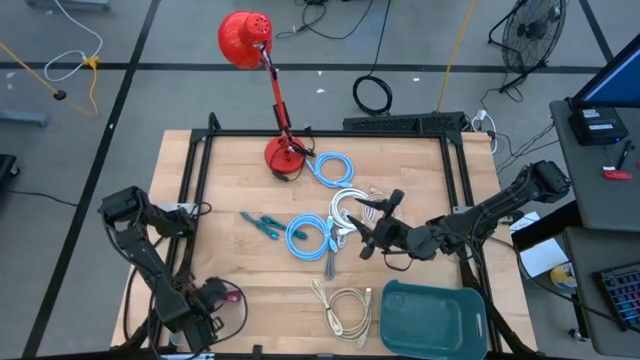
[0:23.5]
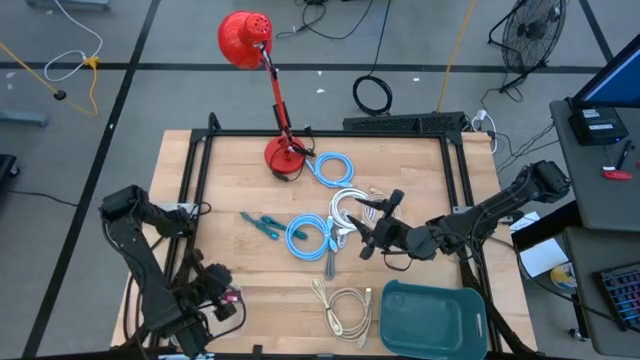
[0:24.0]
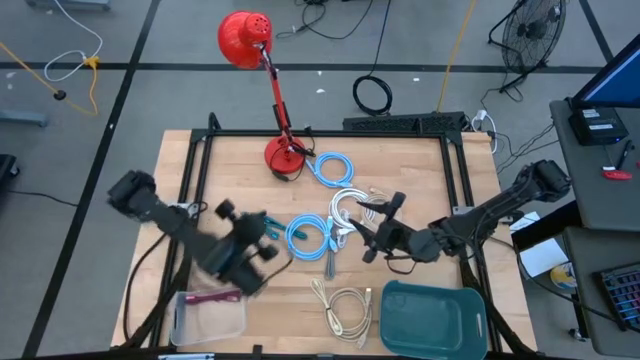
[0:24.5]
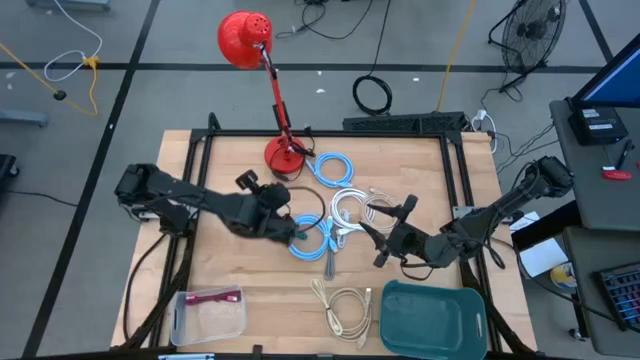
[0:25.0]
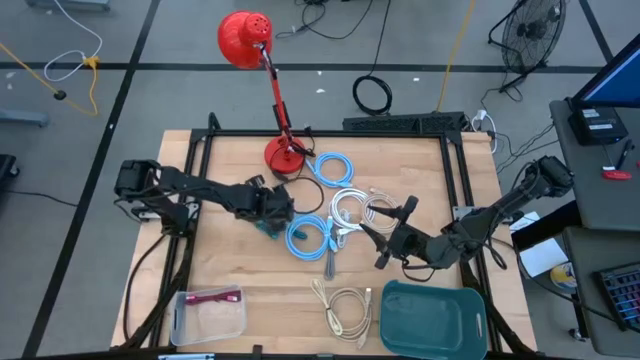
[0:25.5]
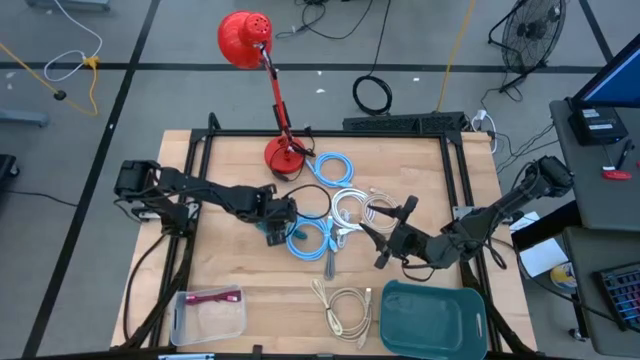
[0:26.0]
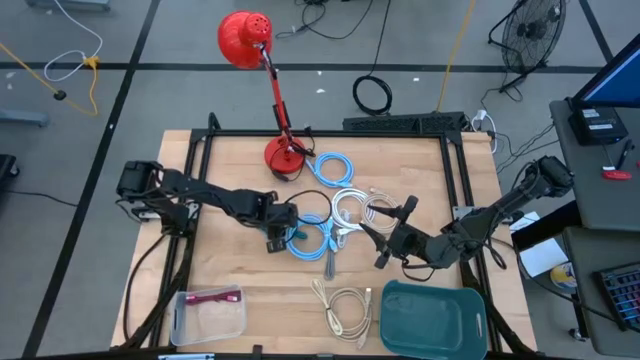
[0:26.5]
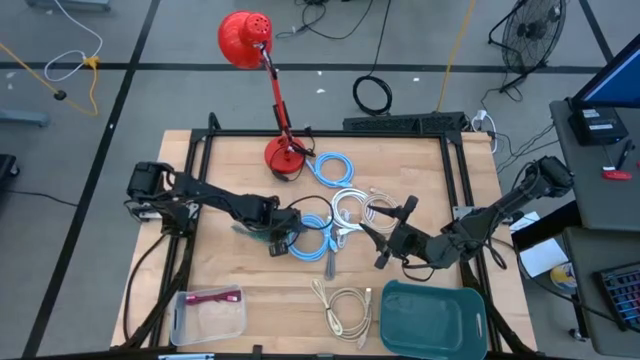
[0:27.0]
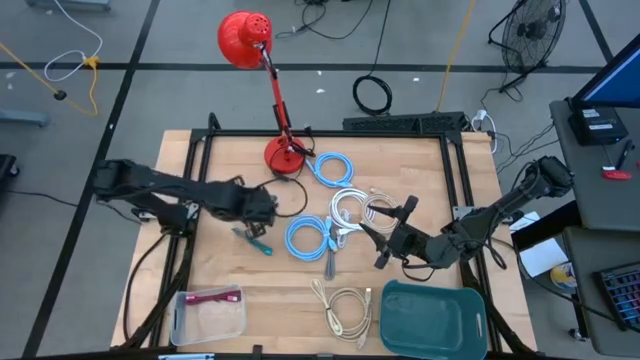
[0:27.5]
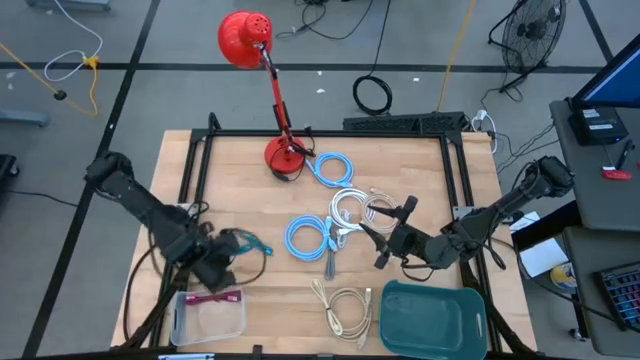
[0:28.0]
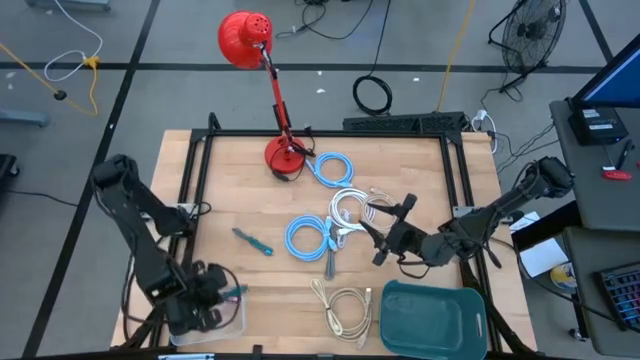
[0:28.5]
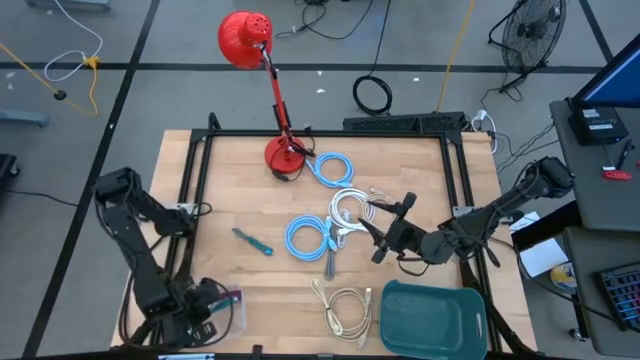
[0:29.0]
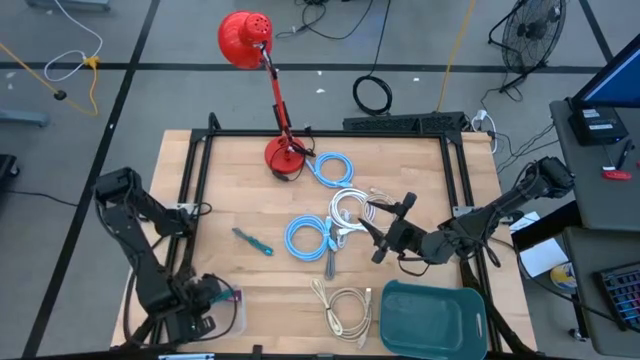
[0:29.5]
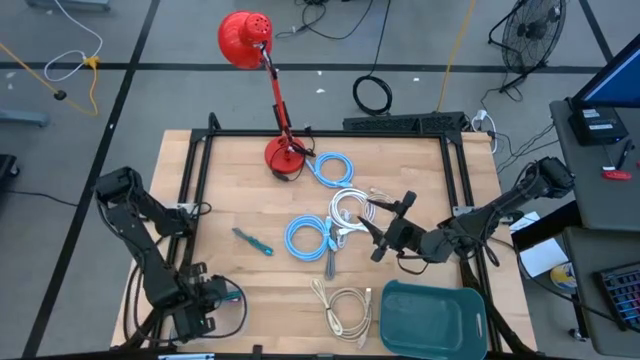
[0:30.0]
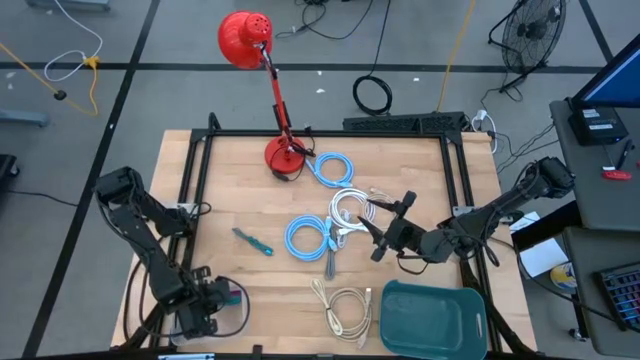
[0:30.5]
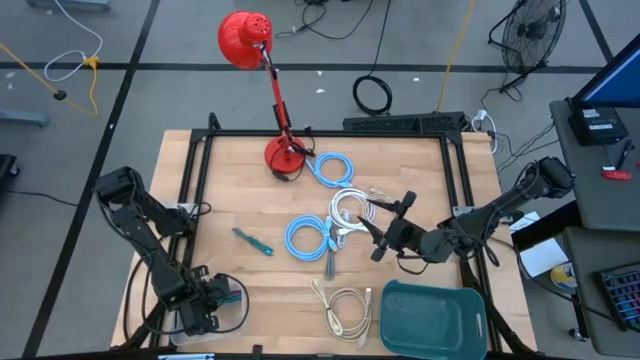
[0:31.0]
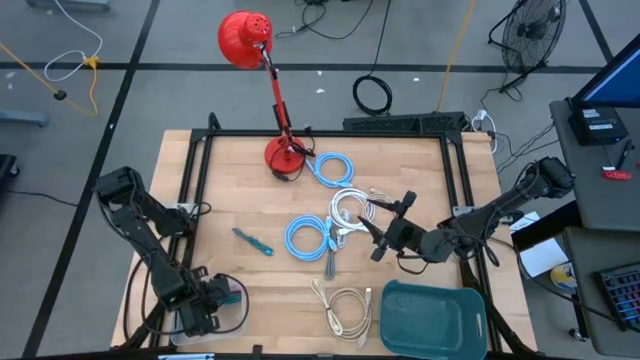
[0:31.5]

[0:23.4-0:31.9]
Task: Pick & Place USB Port
Put the right blue black charger cable into the transparent bin

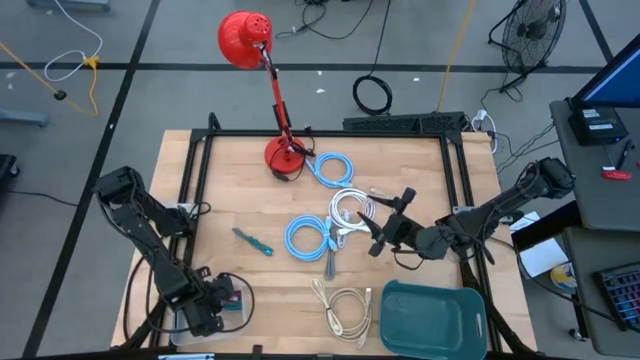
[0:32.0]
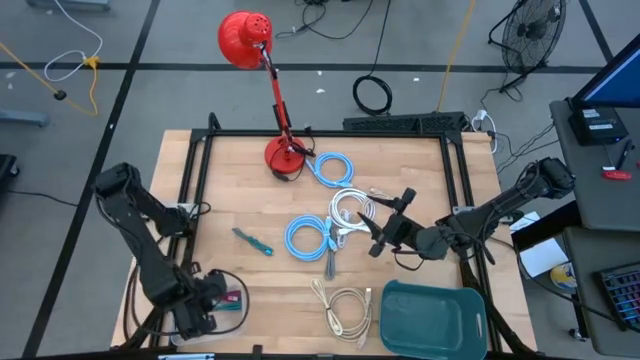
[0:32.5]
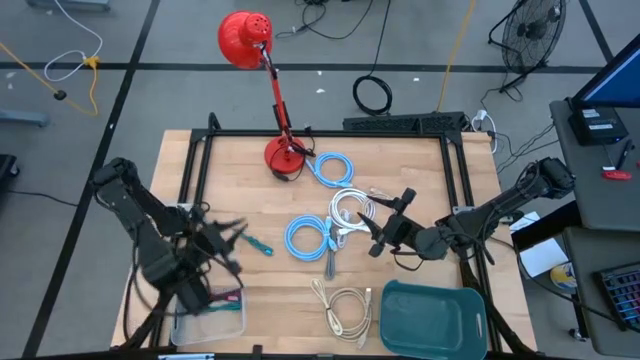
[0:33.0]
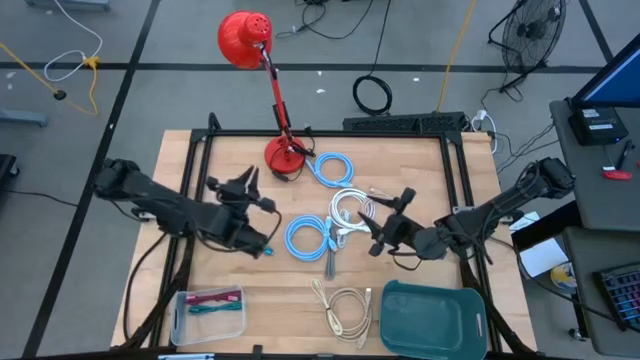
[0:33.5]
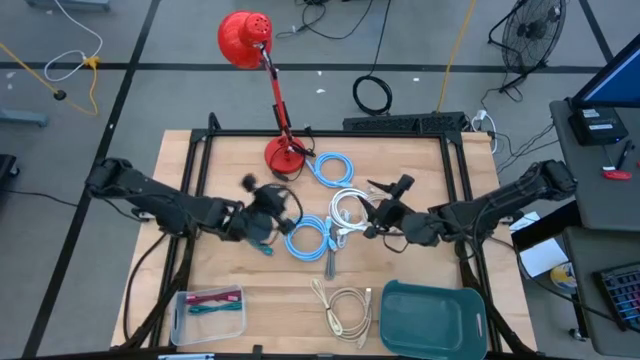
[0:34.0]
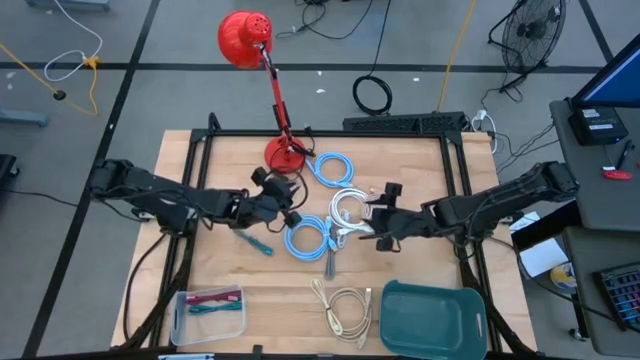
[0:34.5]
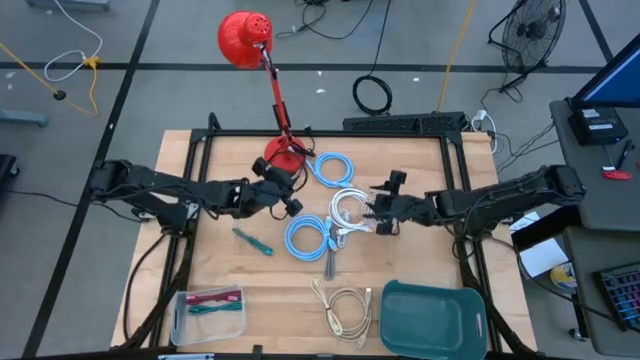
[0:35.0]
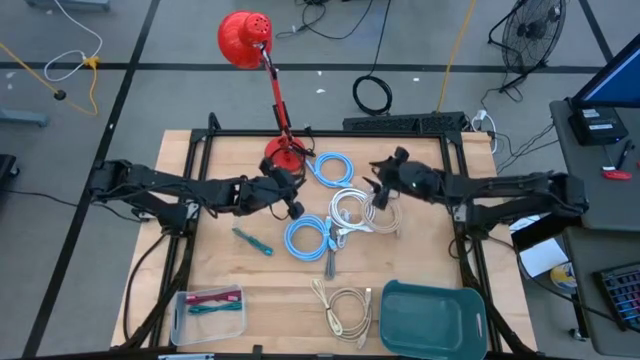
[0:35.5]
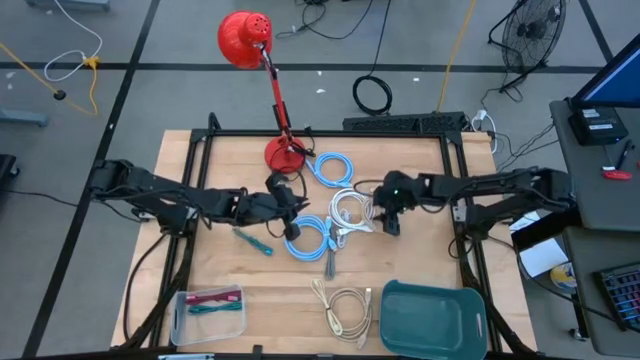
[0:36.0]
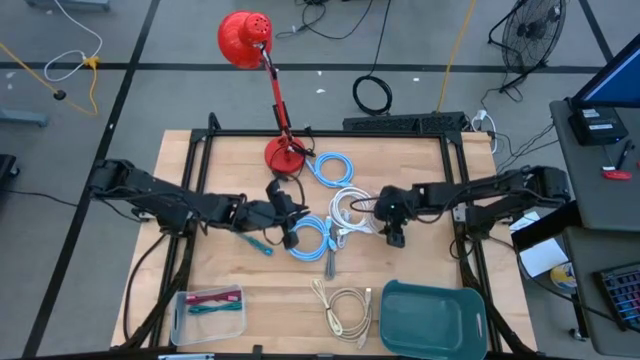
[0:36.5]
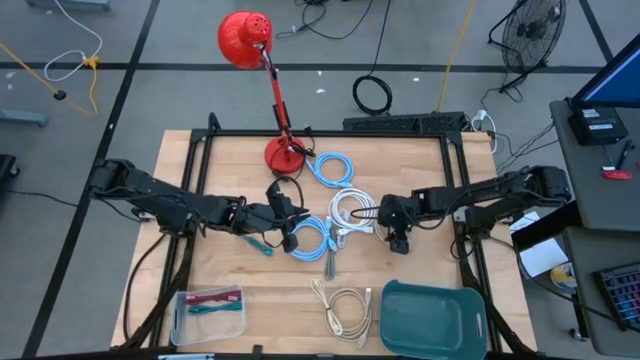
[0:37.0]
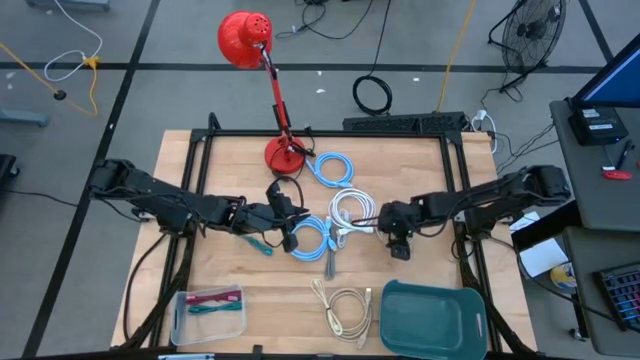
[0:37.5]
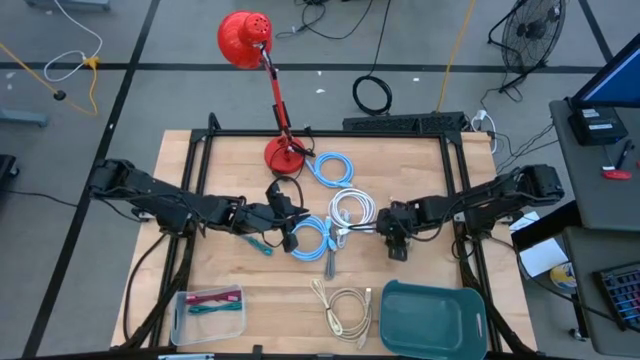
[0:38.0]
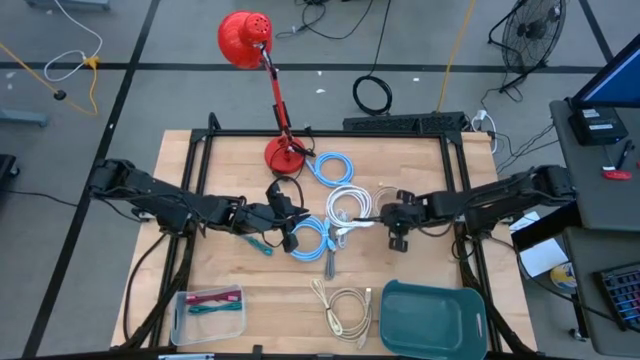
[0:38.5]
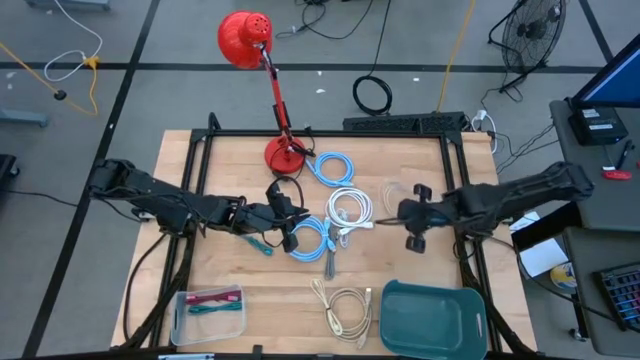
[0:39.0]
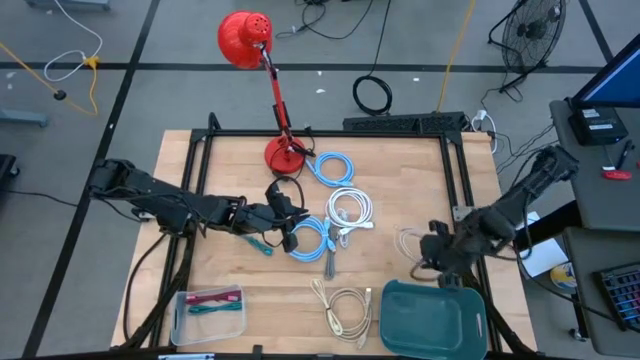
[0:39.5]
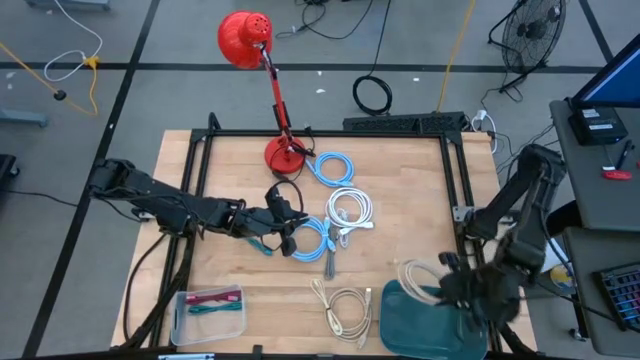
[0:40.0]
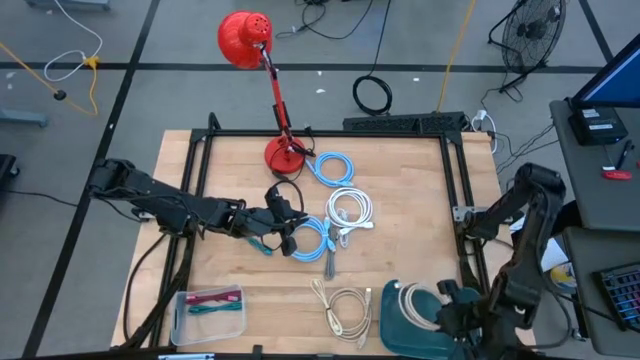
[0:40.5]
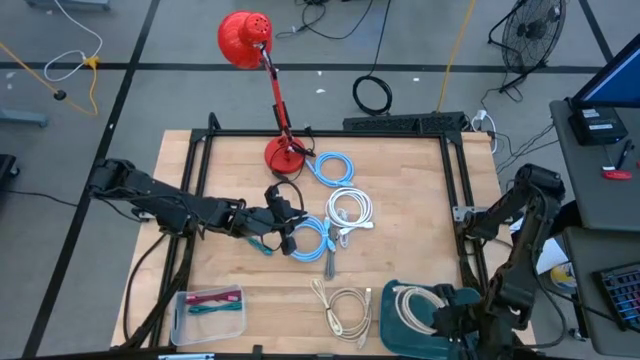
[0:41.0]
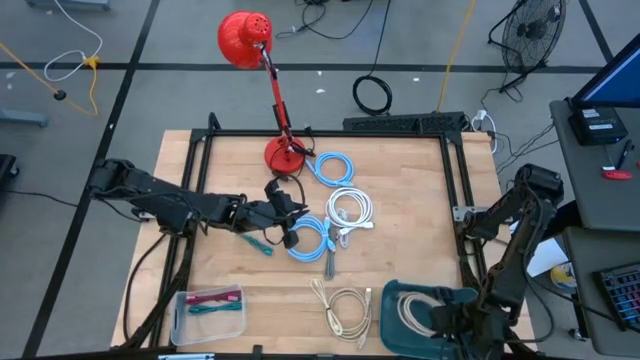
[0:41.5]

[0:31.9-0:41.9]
Put the top brown charger cable into the blue bin
